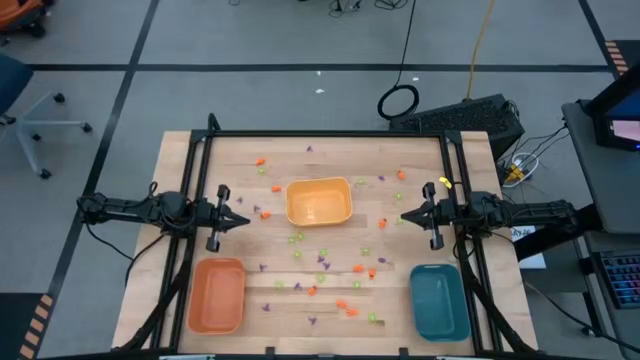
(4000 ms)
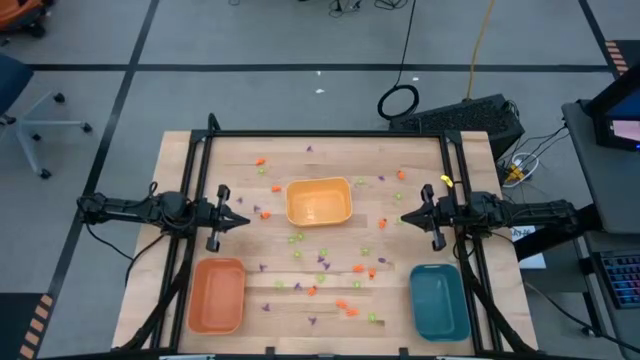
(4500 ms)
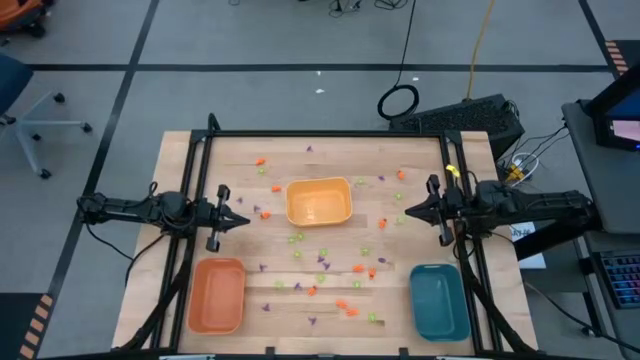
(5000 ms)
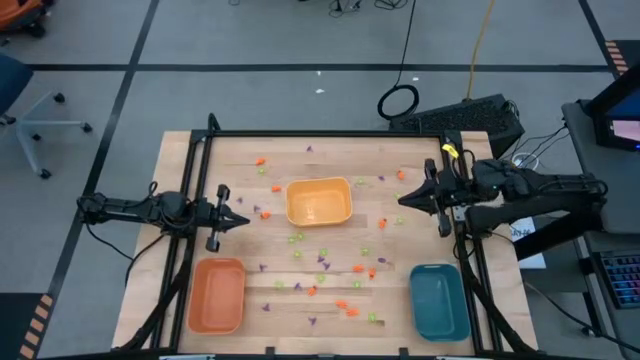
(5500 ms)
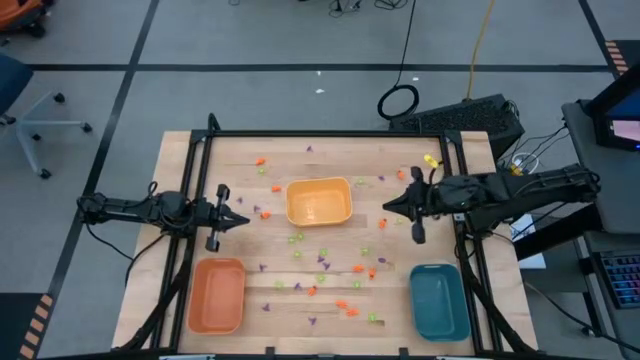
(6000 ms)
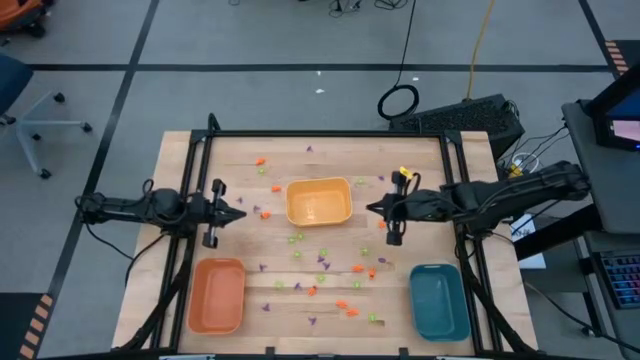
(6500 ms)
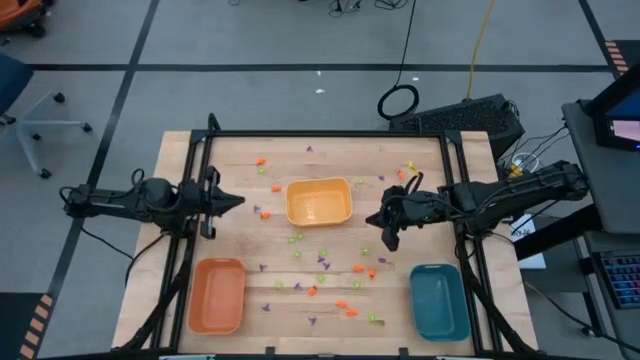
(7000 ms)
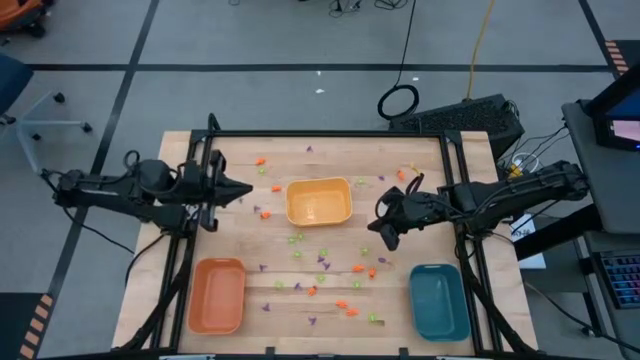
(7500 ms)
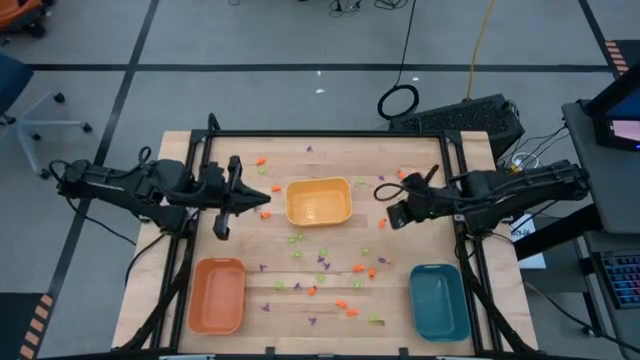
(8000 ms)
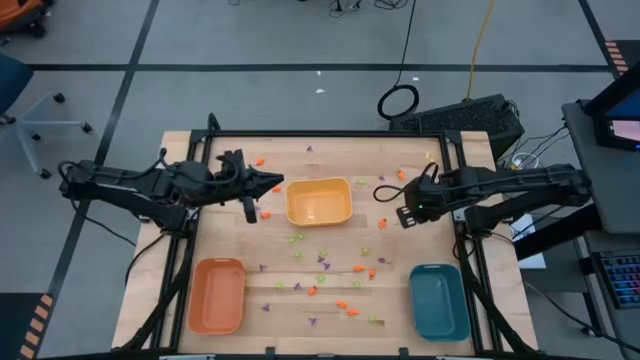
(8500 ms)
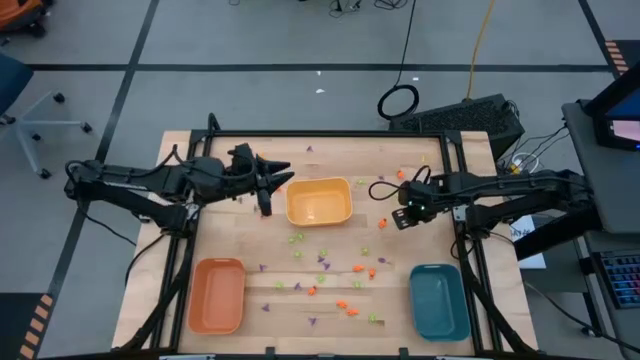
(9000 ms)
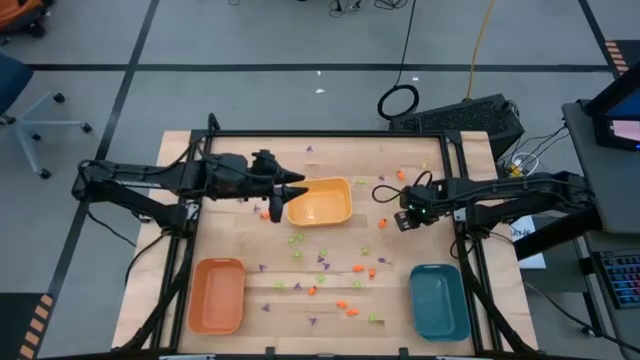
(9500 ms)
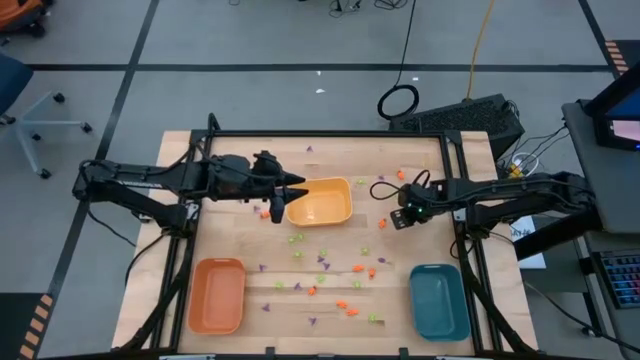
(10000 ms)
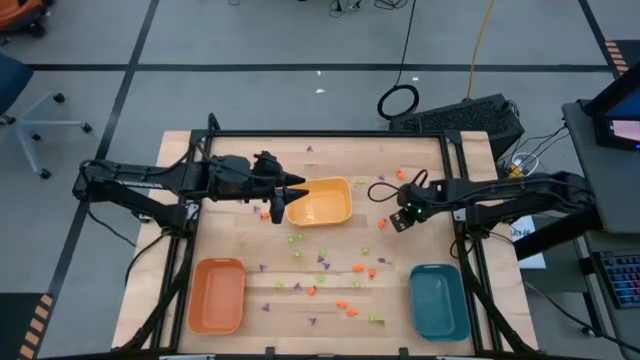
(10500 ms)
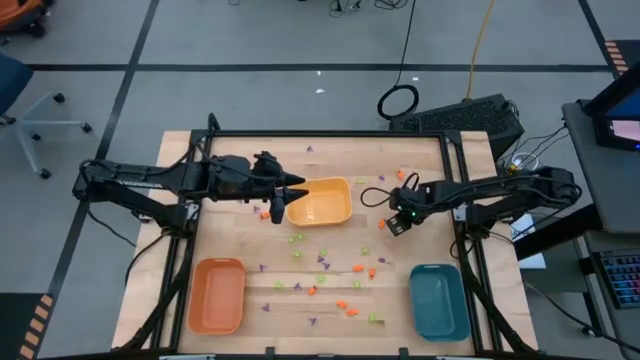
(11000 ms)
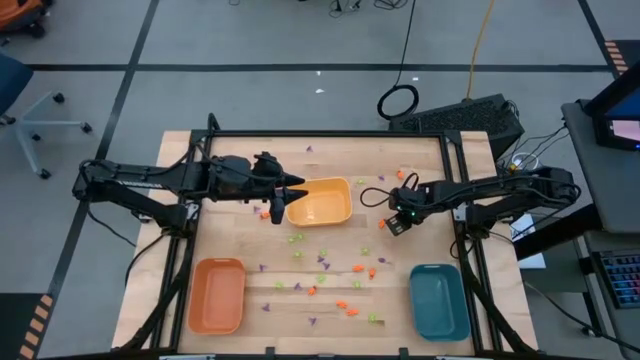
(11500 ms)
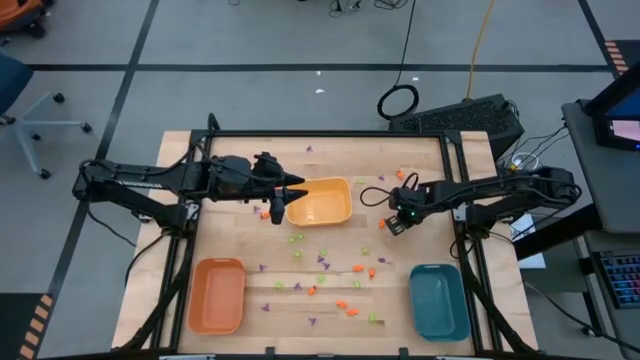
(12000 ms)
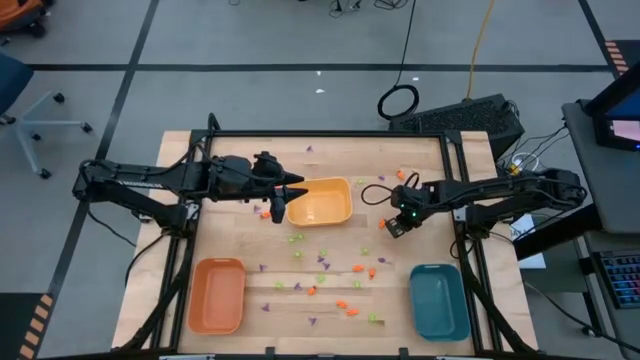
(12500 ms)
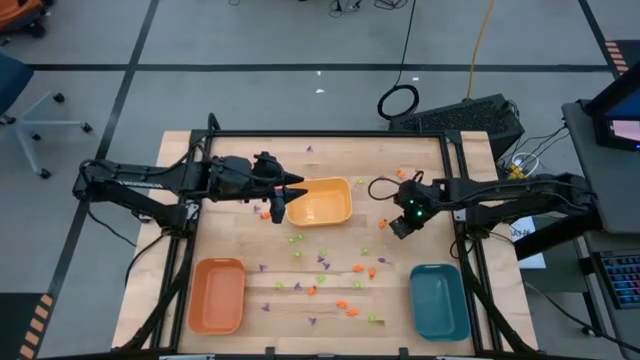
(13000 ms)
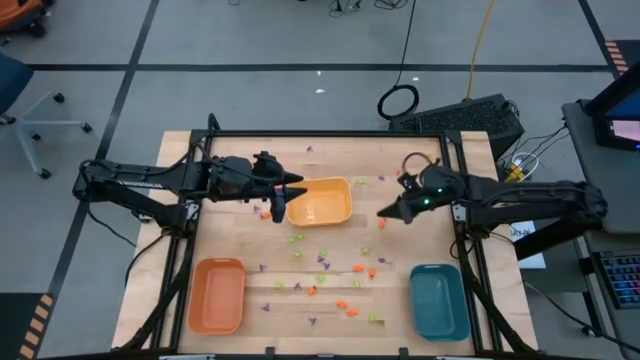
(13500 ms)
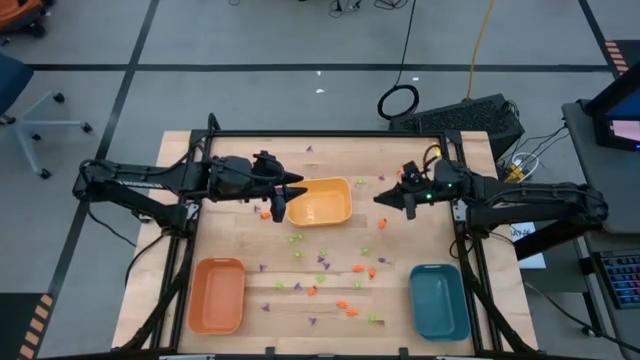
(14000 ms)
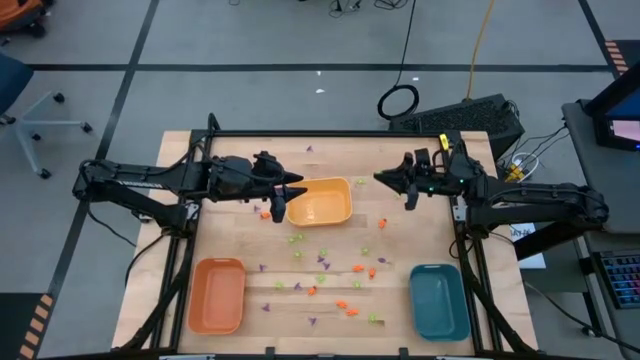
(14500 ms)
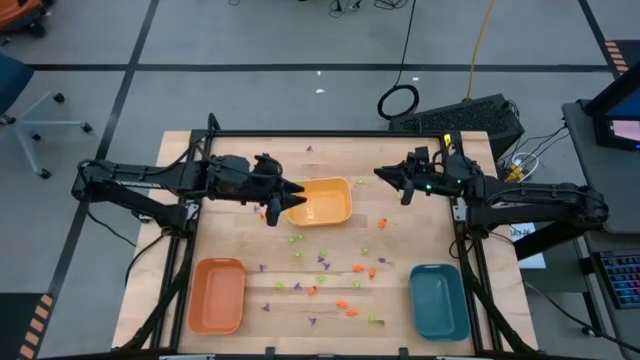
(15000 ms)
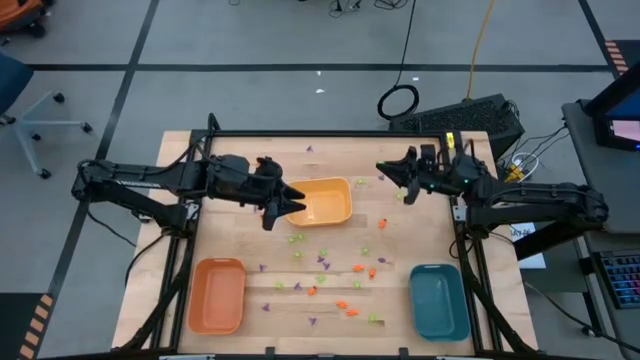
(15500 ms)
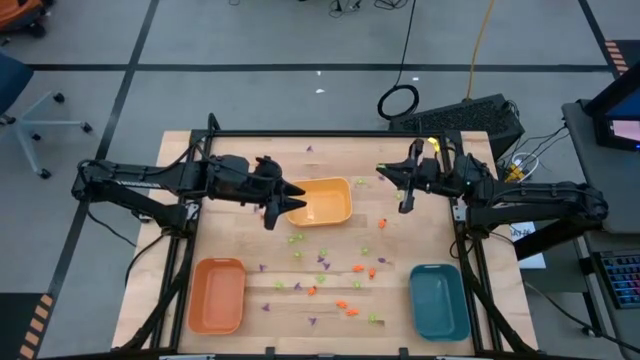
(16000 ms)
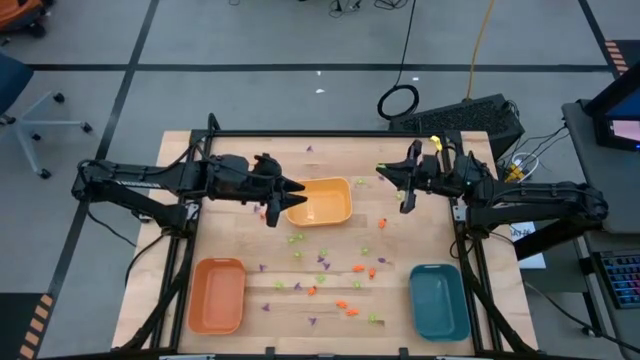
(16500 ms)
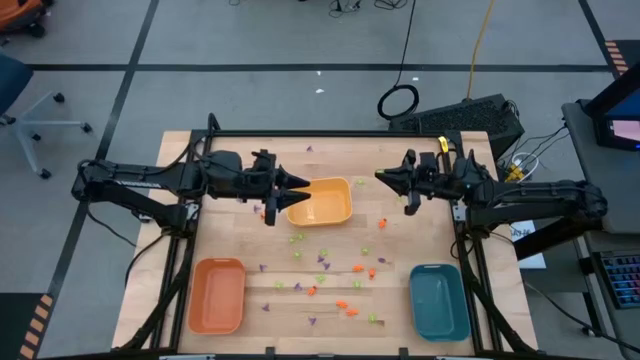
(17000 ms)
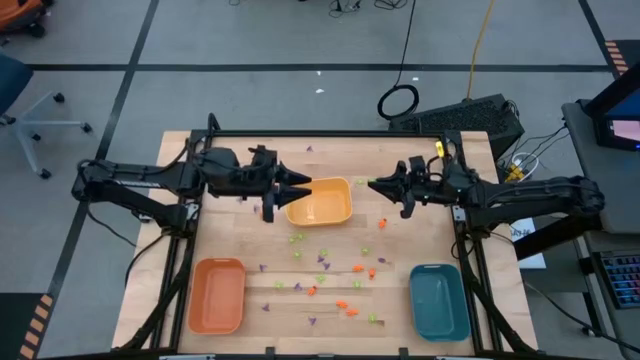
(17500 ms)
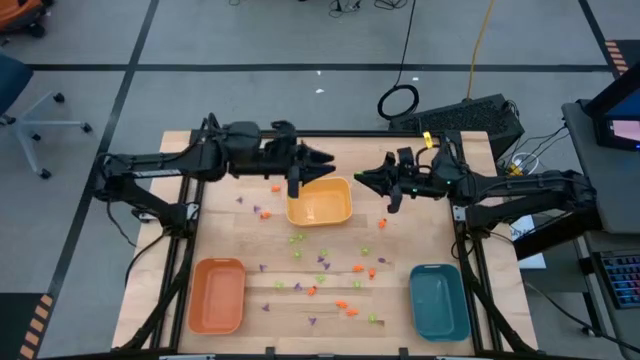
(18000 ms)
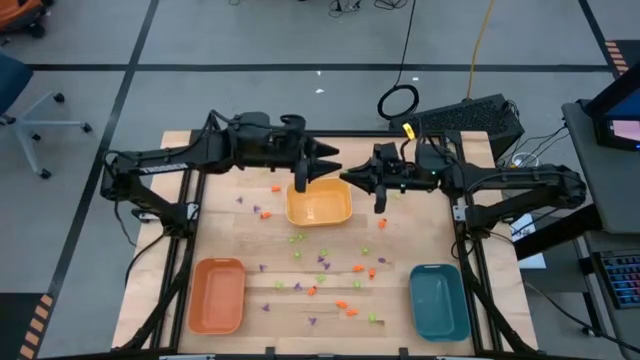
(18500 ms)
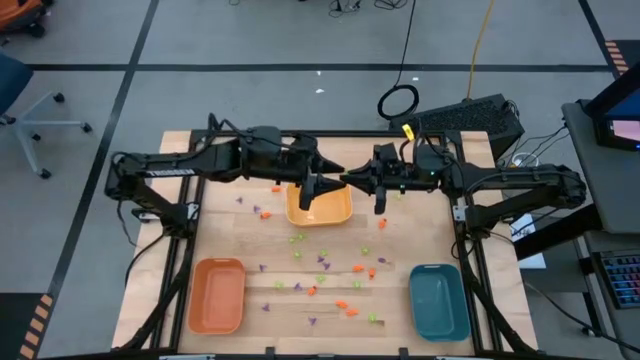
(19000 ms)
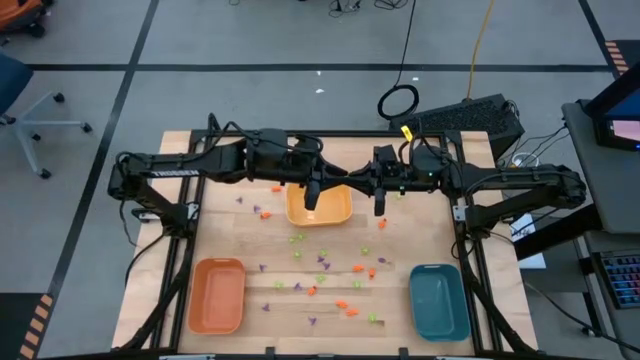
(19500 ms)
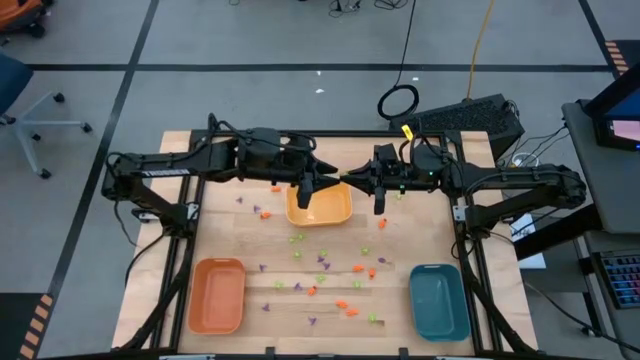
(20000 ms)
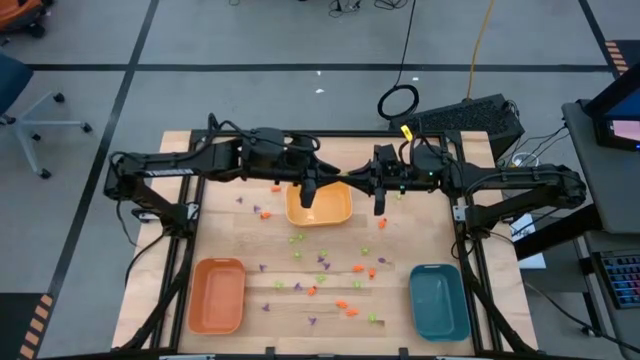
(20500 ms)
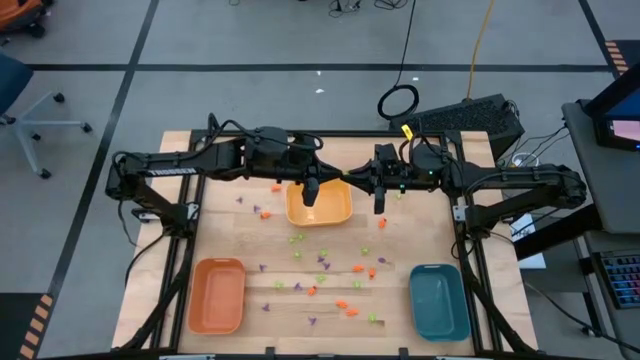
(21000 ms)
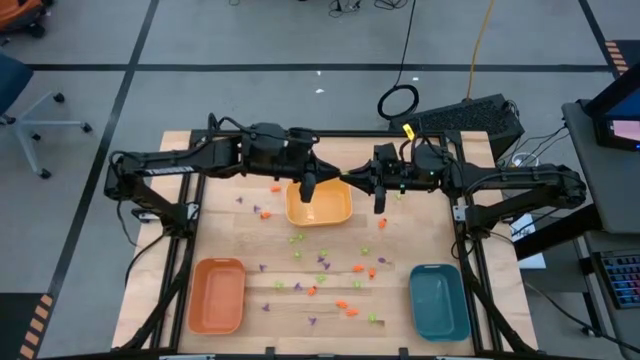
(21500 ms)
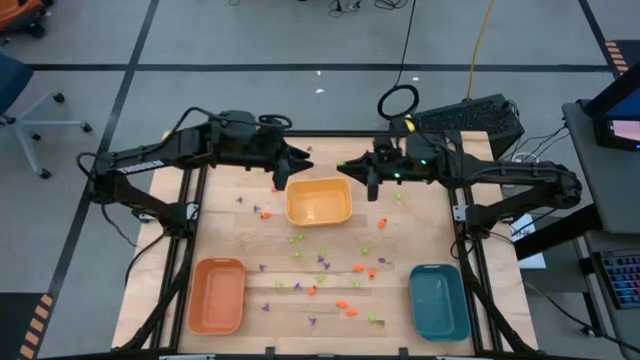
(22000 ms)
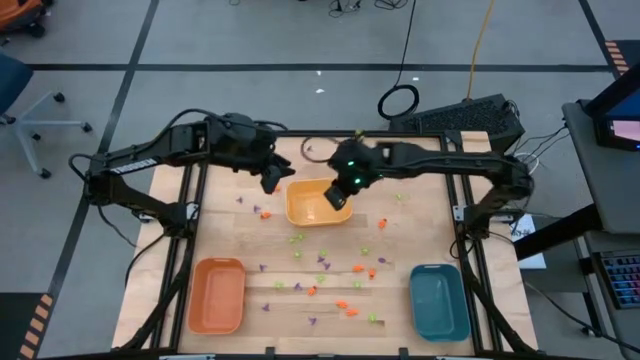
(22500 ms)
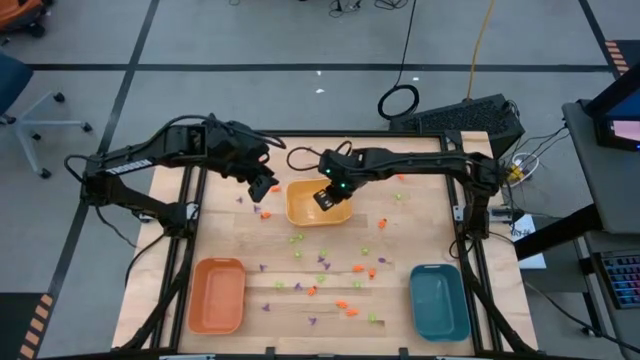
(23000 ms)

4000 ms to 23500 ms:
Task: Sort Halloween decoration
Put the green spider toy into the yellow bin
